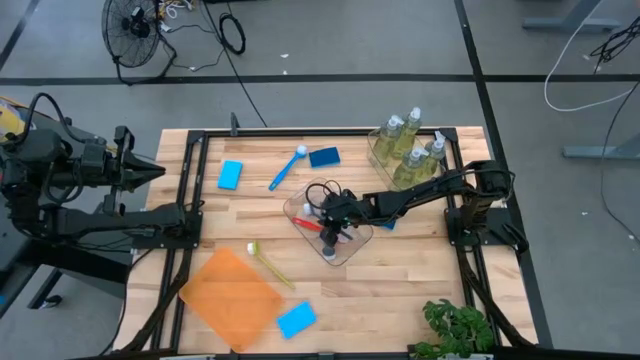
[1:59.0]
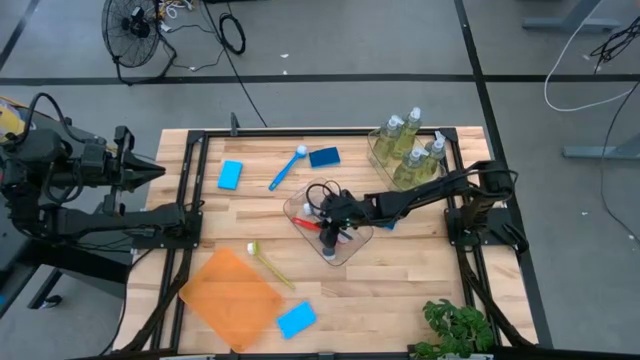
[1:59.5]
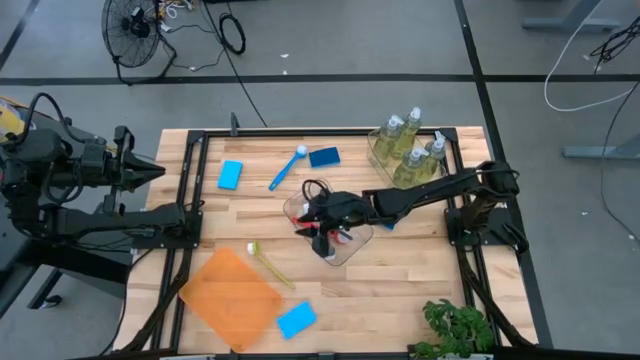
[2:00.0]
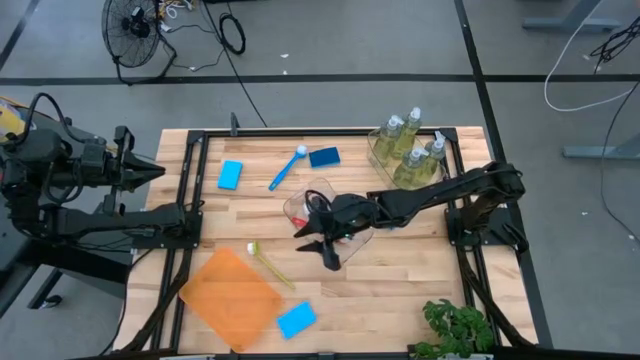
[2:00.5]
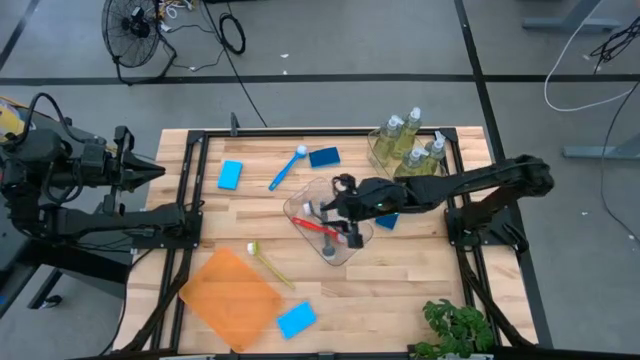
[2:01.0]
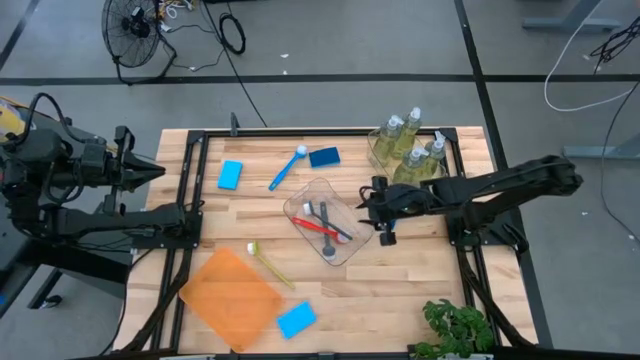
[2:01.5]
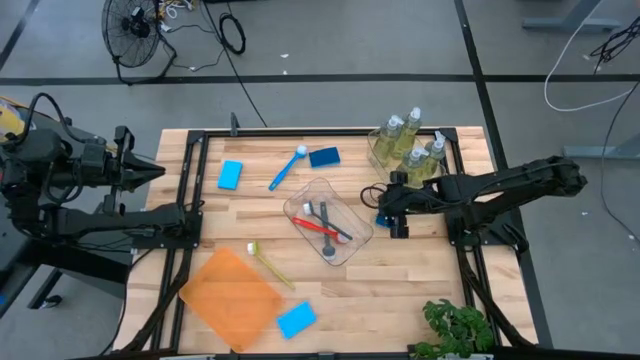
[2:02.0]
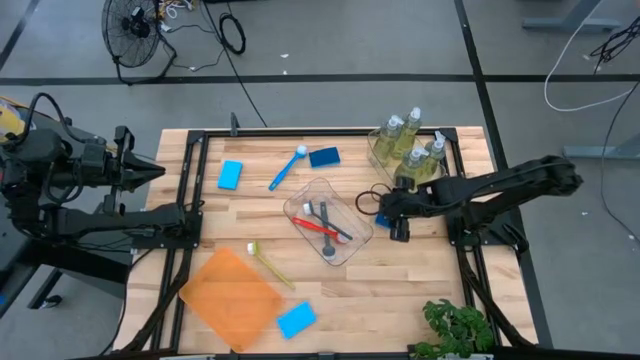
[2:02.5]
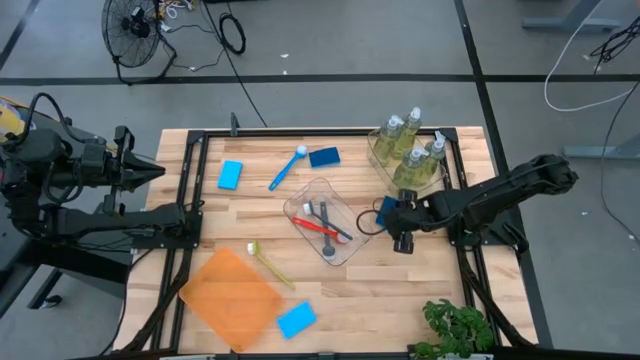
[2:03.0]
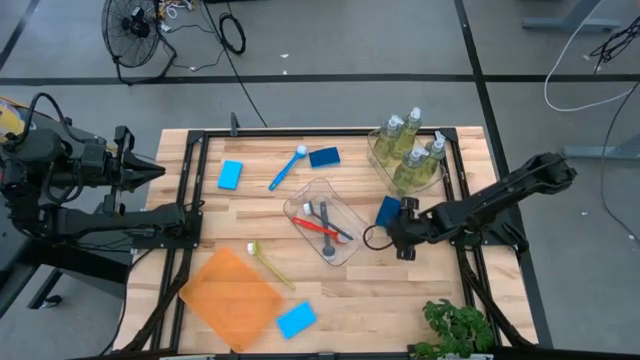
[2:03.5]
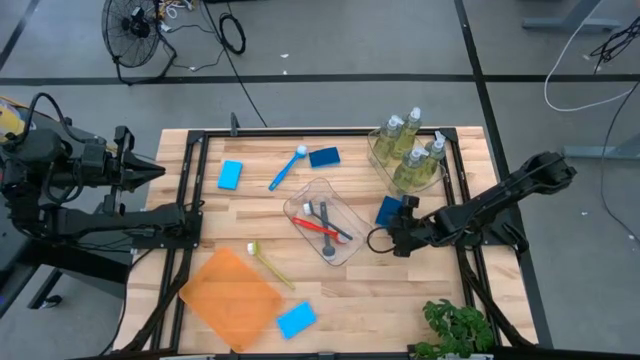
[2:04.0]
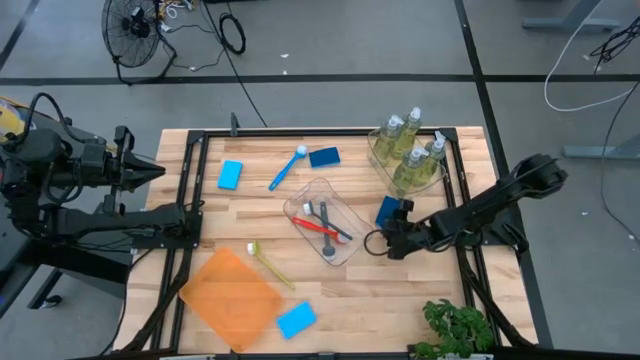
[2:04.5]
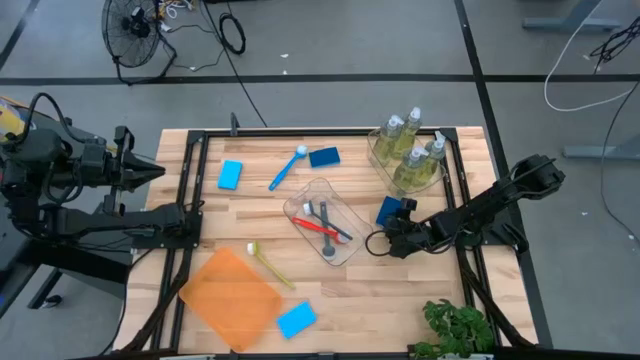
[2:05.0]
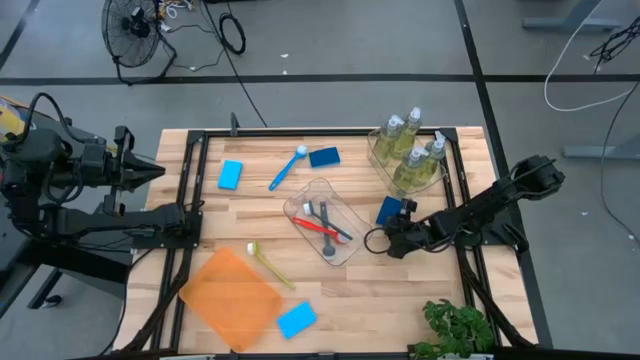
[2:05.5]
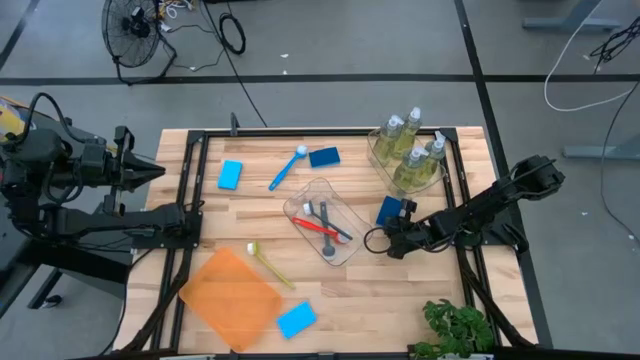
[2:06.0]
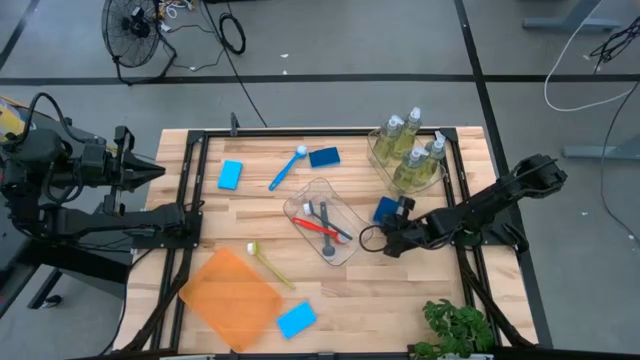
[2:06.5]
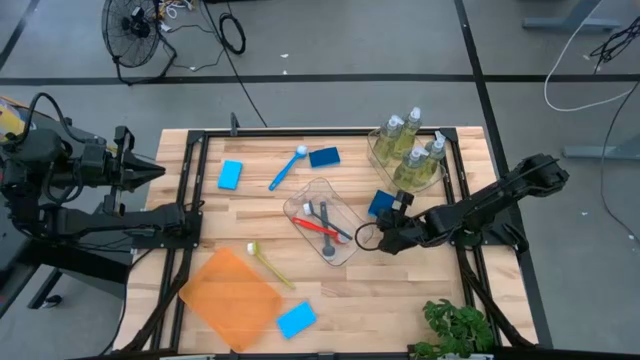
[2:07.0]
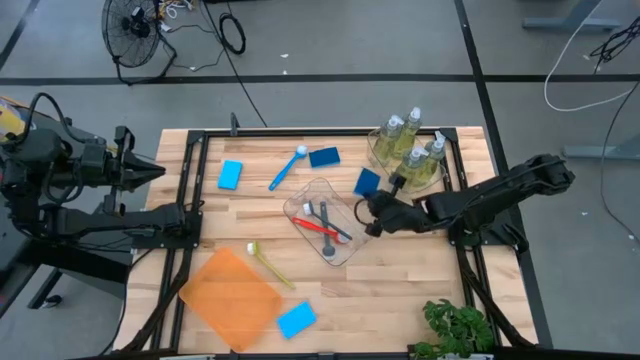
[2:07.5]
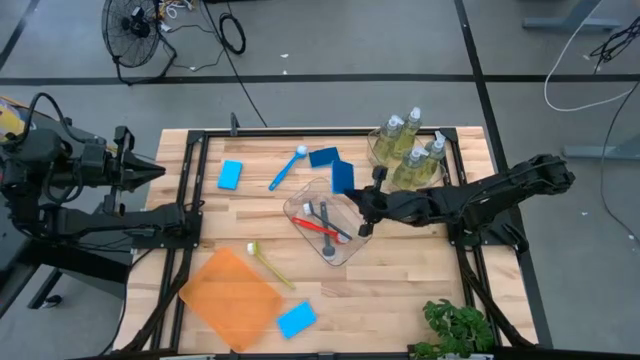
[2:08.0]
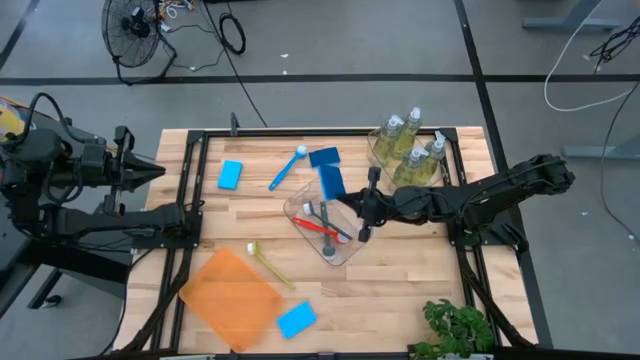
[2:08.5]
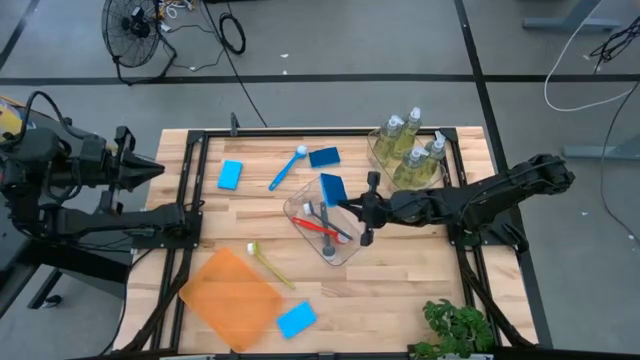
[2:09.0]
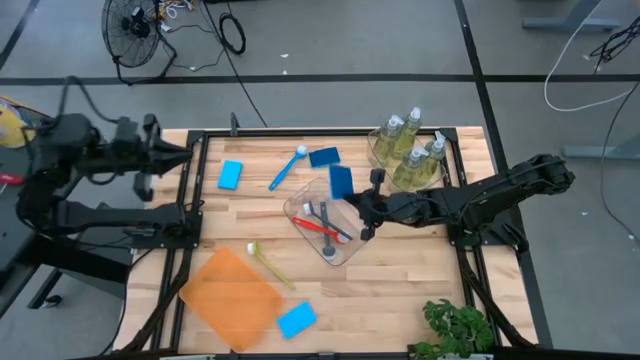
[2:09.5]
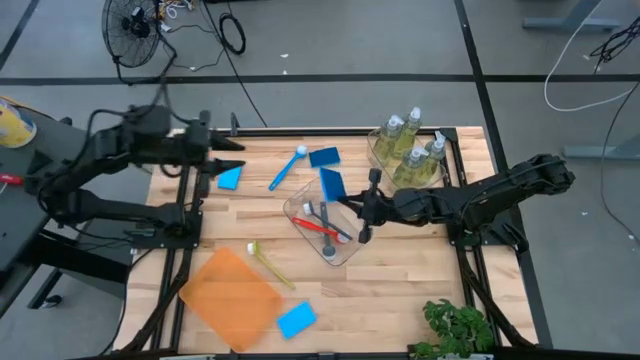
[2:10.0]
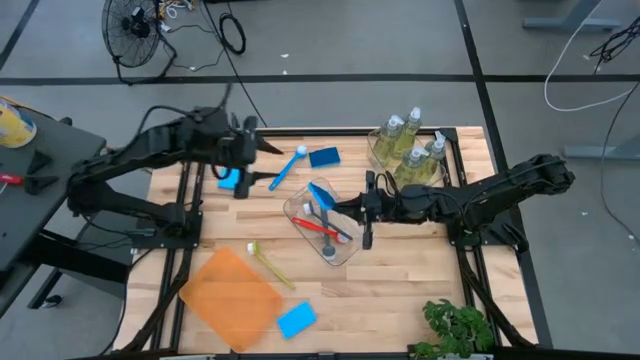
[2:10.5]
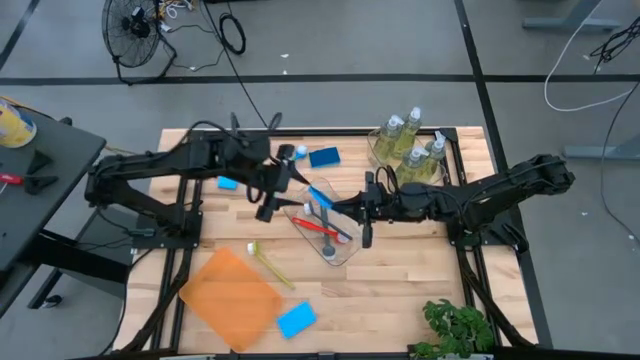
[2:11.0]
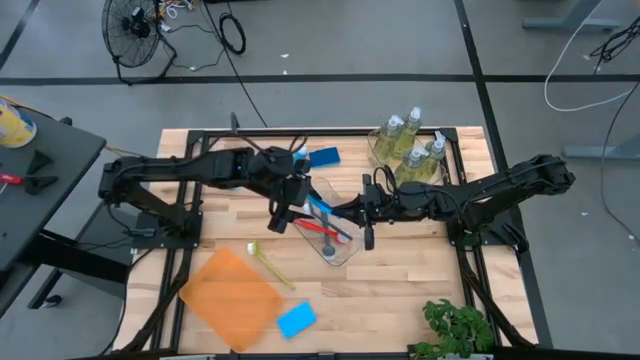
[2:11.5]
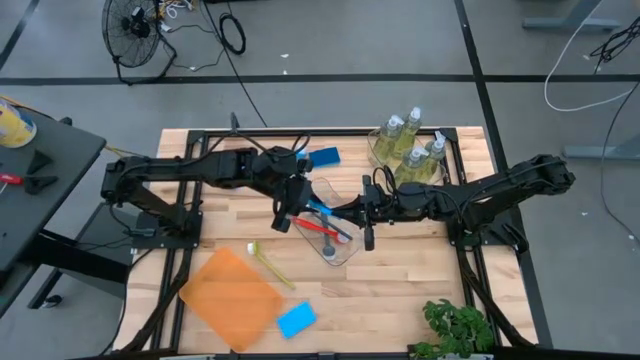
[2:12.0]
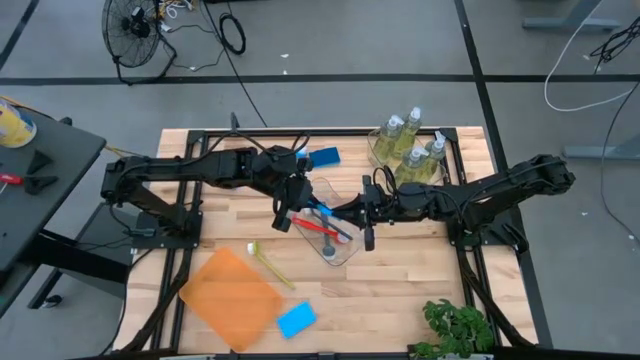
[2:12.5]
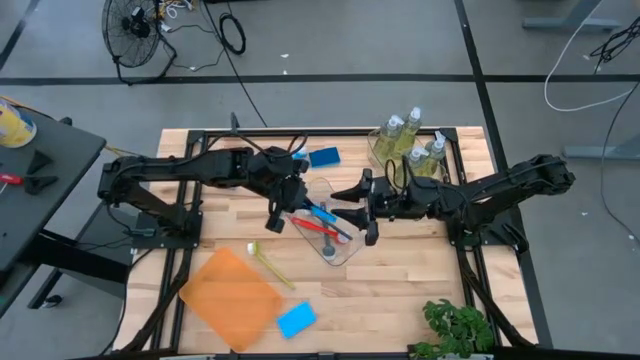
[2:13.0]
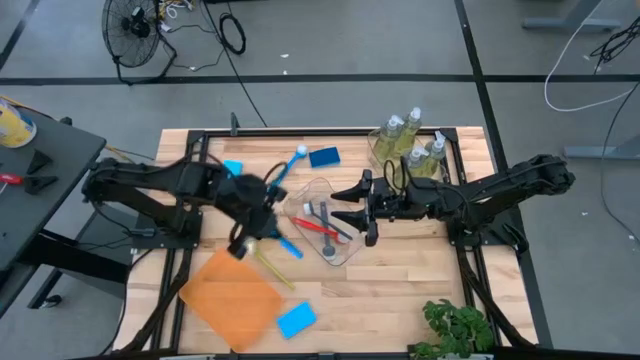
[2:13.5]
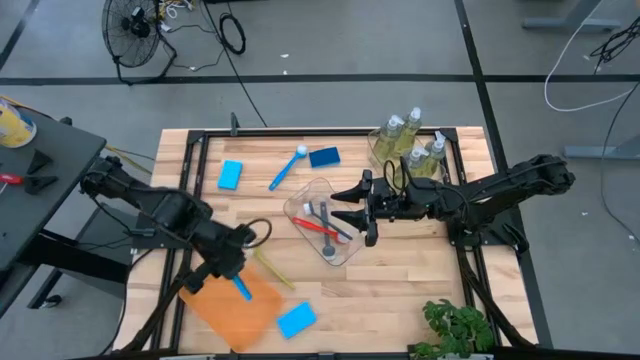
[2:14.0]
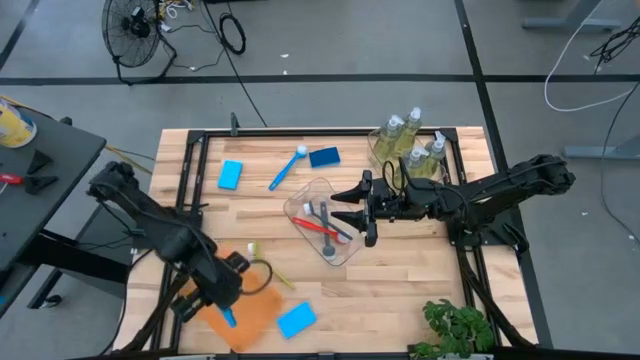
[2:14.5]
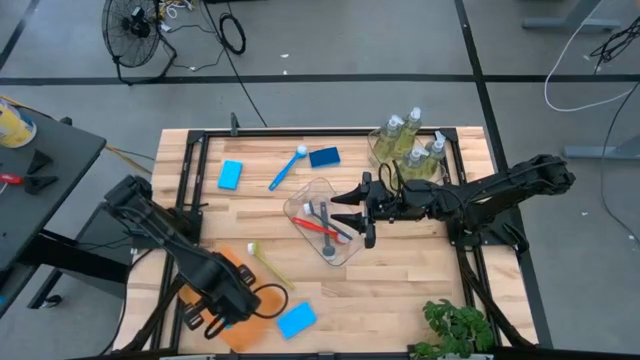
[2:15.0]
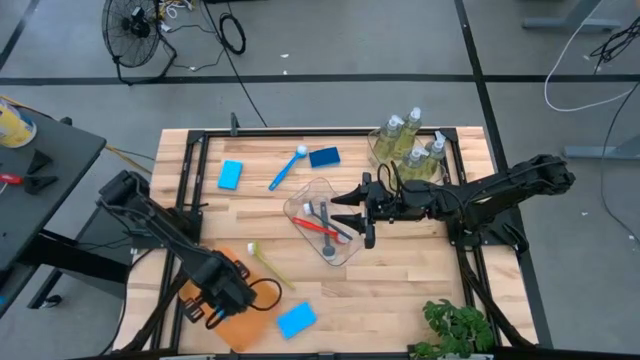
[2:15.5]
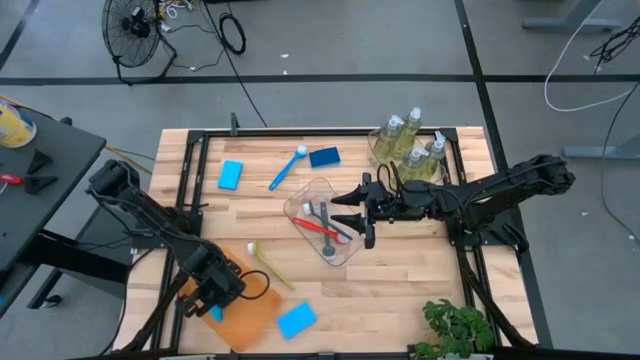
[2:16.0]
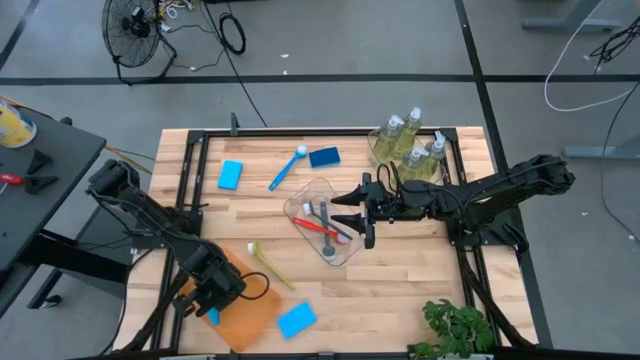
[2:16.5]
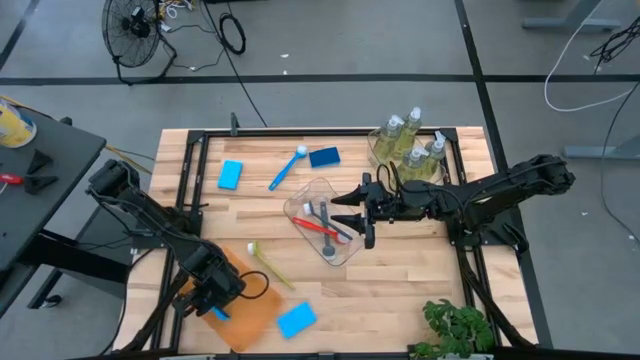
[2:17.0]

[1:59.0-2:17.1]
Task: Pick & Place Kitchen Sink Supplies
Put the blue sponge into the transparent orange bin

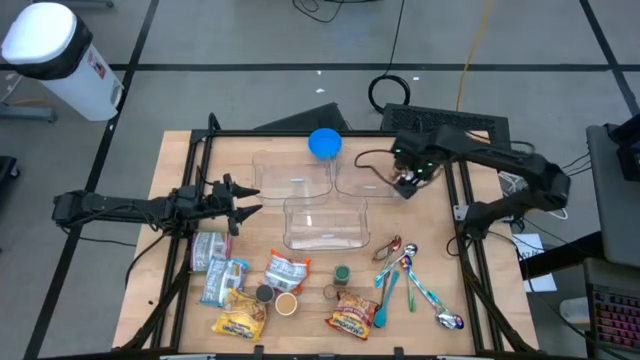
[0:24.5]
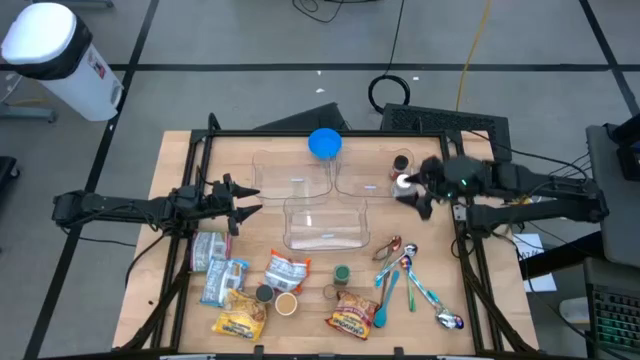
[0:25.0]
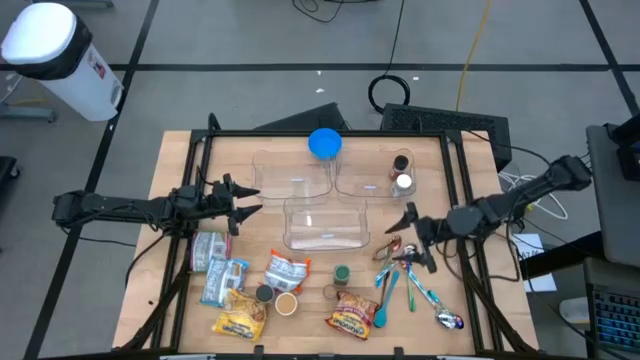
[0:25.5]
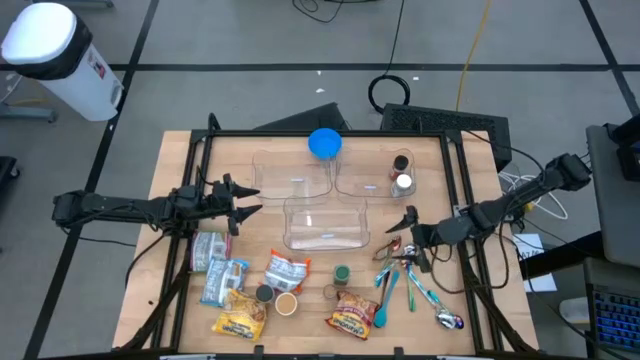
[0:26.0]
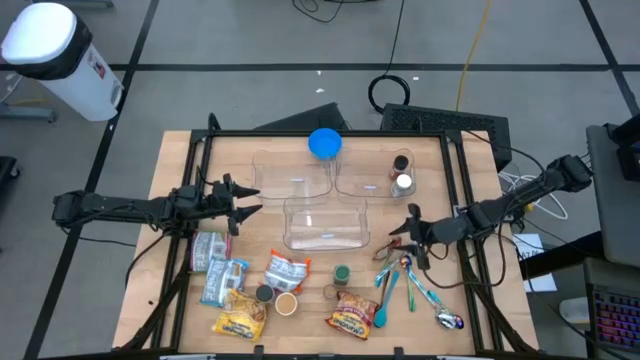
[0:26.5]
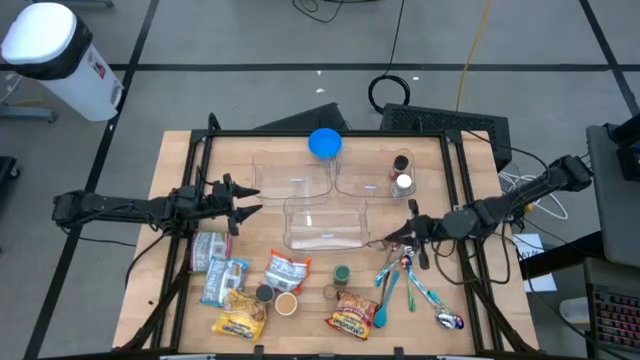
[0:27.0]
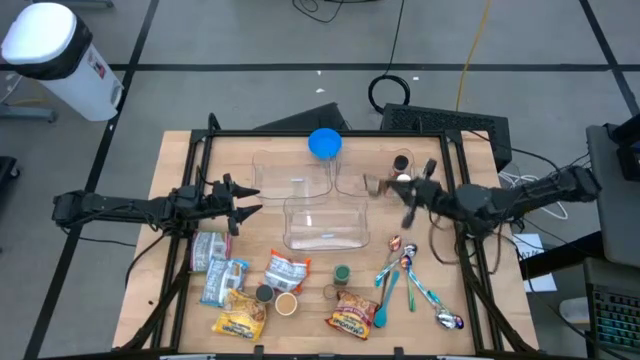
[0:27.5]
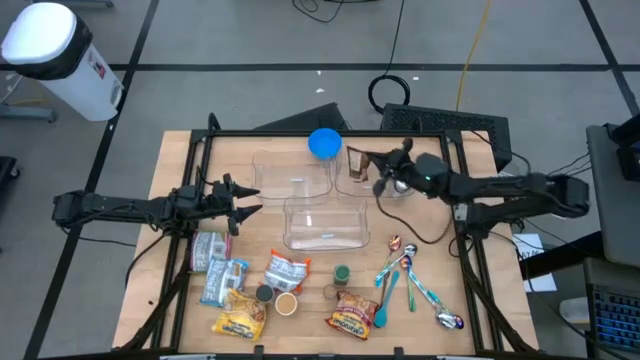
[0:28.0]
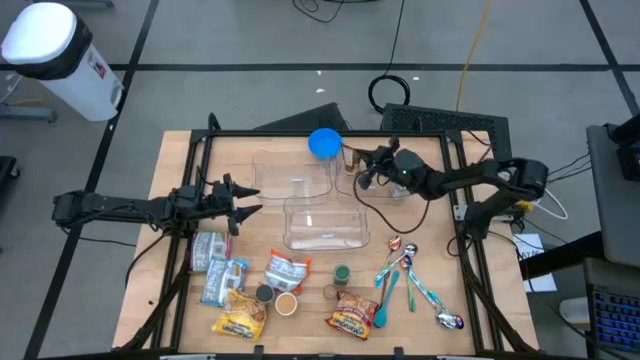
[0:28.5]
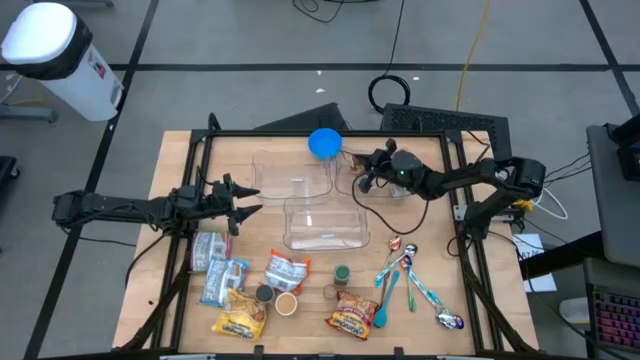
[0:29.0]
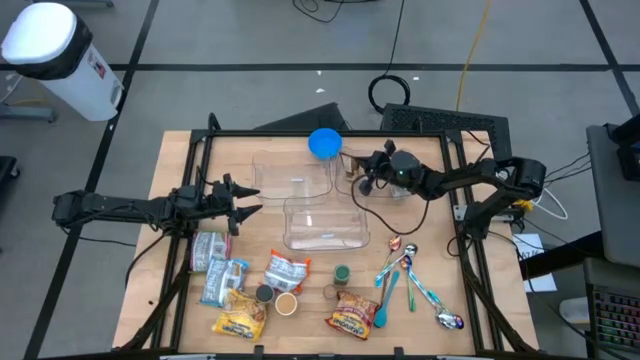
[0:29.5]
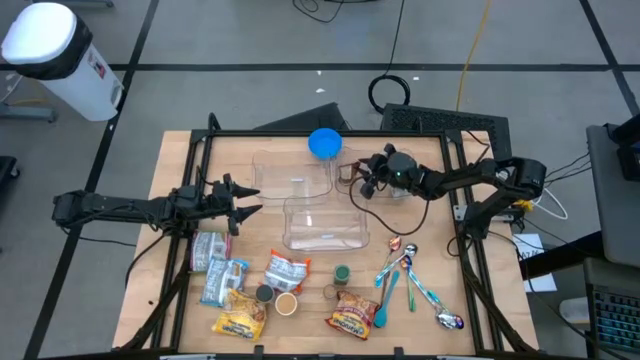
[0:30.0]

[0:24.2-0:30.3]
Task: Pick & Place Food Item
Put the orange seasoning bag into the top right transparent bin
